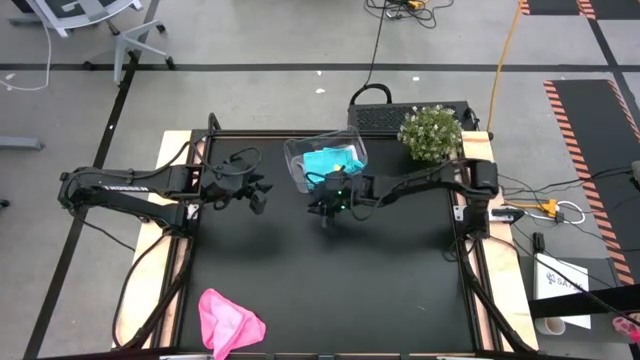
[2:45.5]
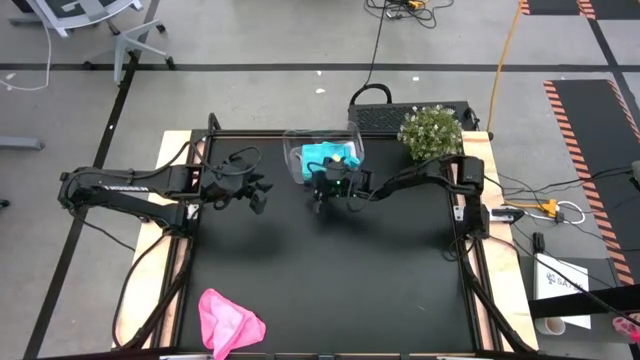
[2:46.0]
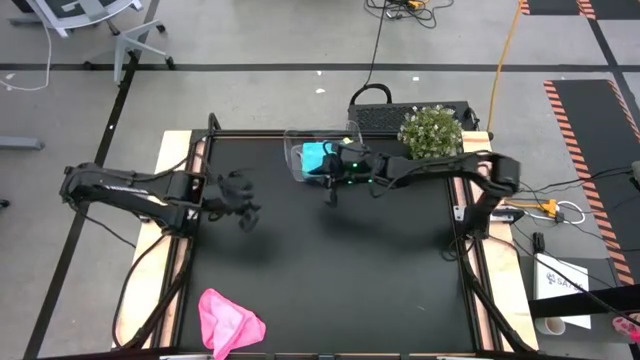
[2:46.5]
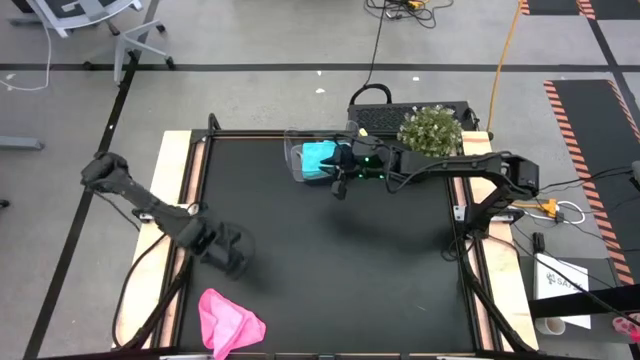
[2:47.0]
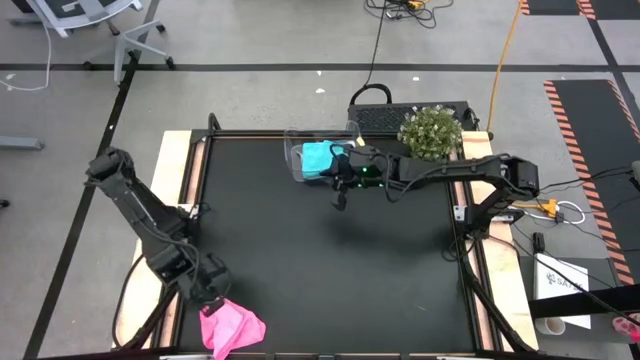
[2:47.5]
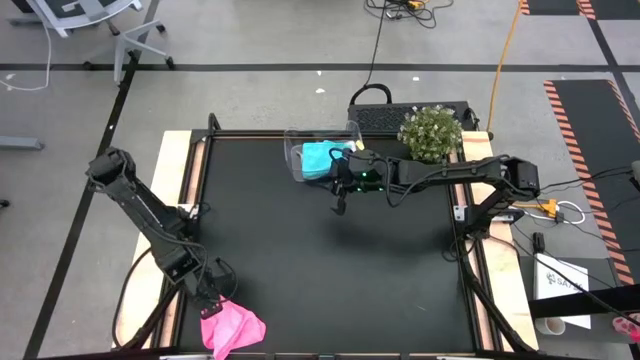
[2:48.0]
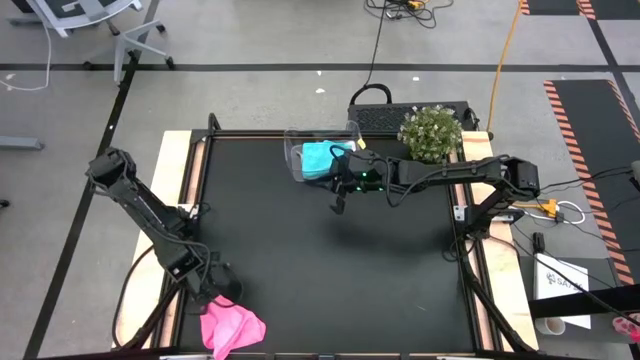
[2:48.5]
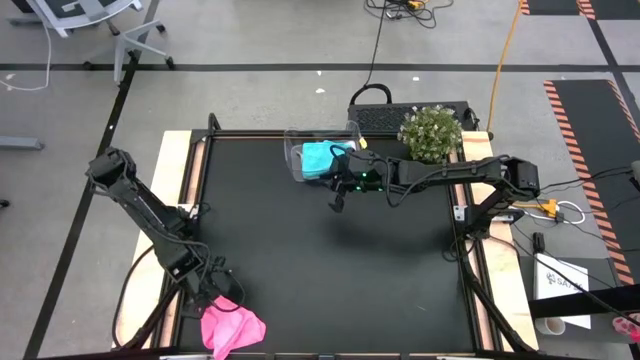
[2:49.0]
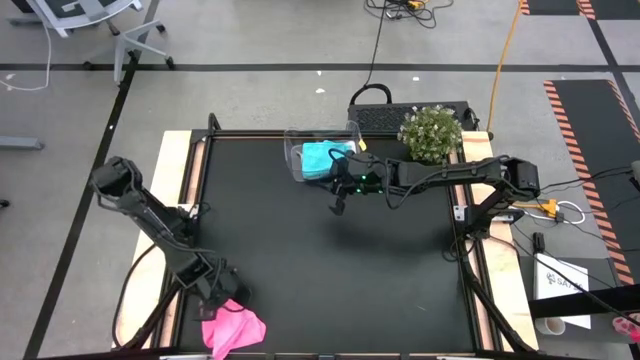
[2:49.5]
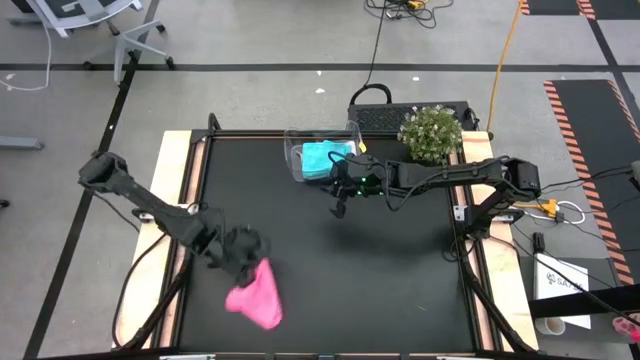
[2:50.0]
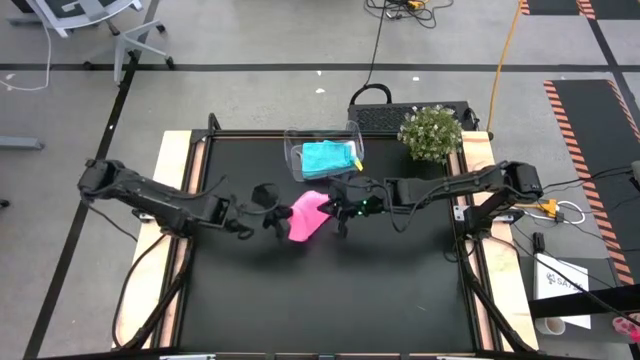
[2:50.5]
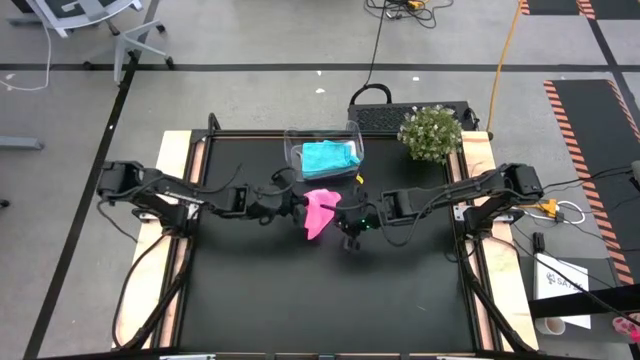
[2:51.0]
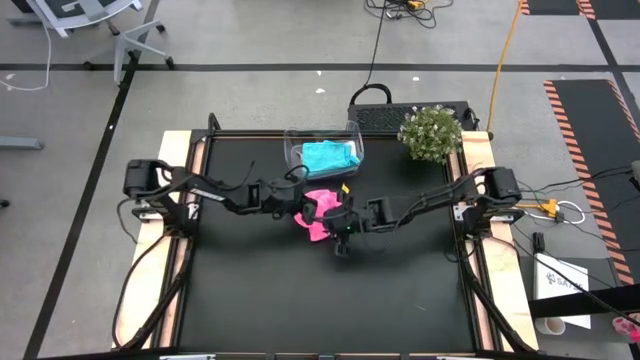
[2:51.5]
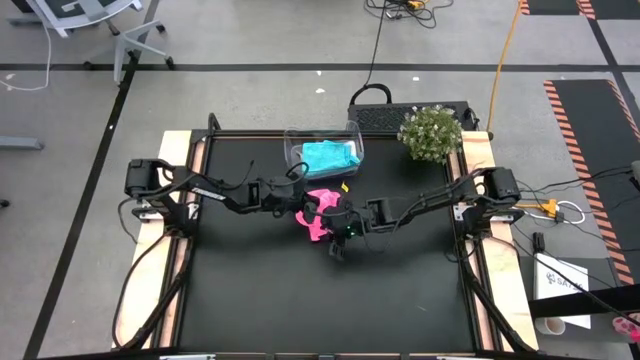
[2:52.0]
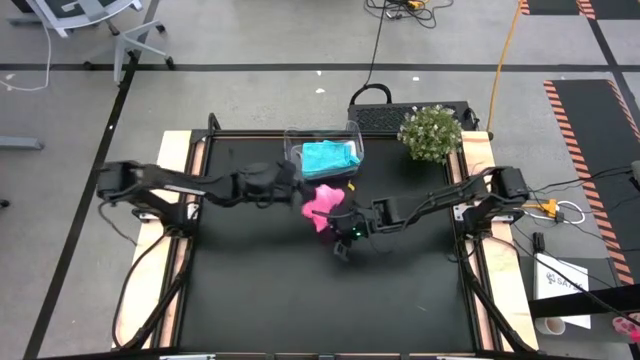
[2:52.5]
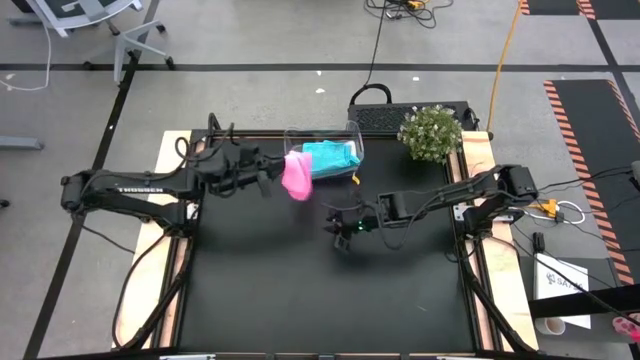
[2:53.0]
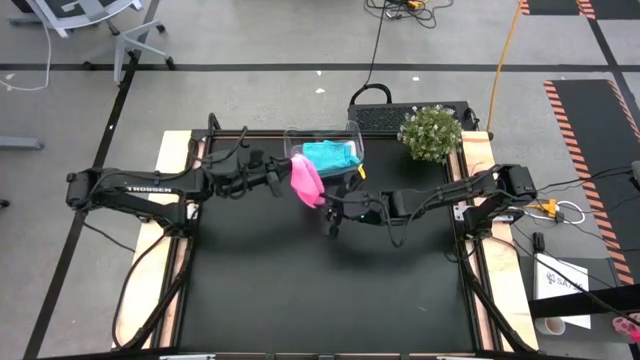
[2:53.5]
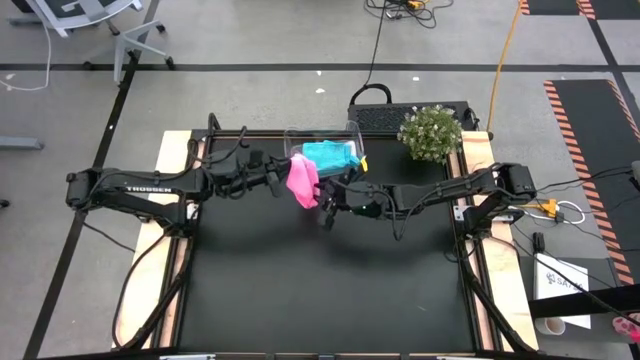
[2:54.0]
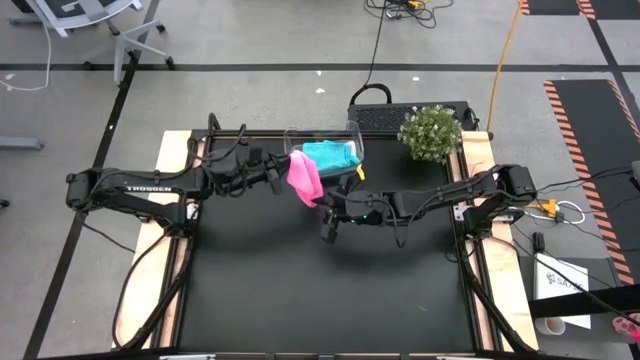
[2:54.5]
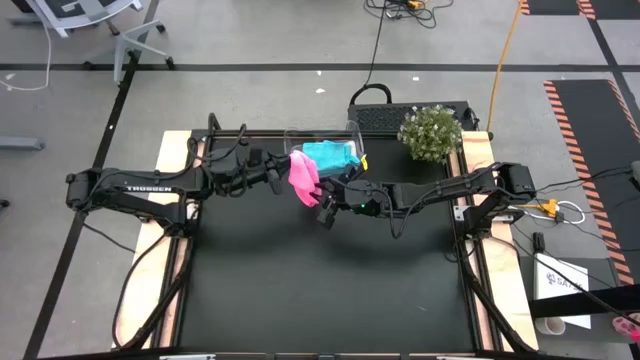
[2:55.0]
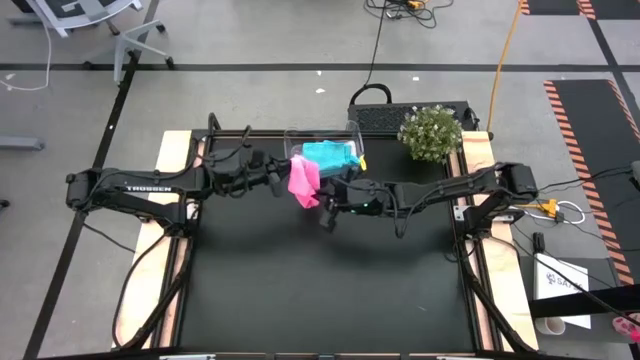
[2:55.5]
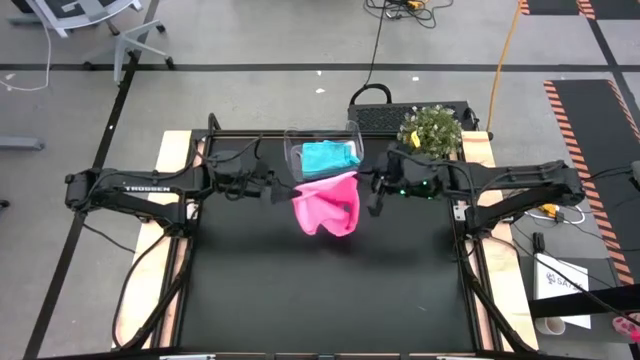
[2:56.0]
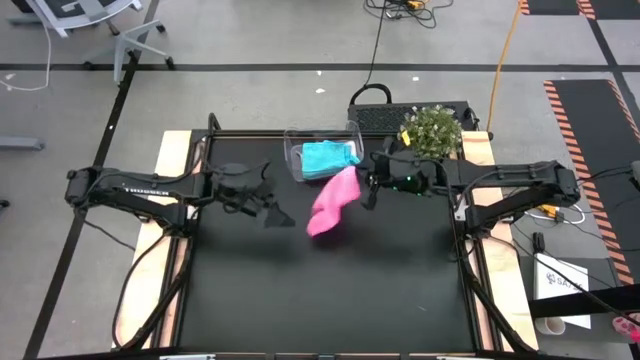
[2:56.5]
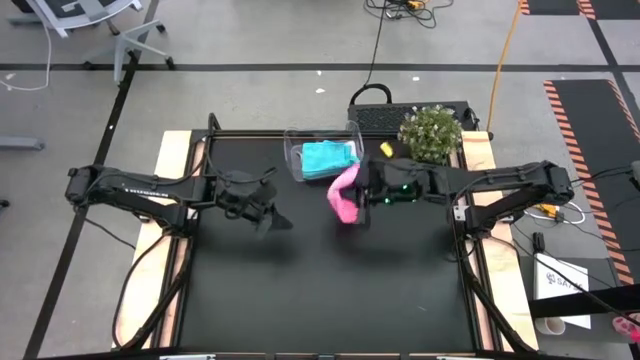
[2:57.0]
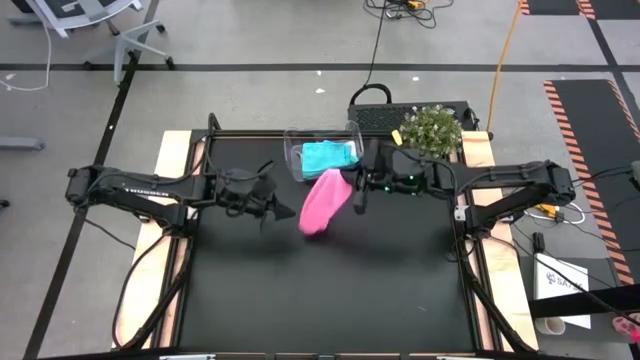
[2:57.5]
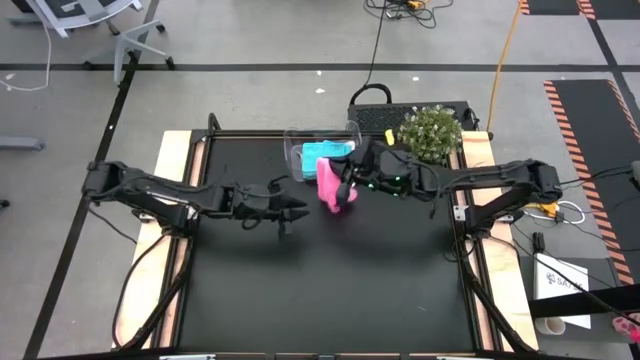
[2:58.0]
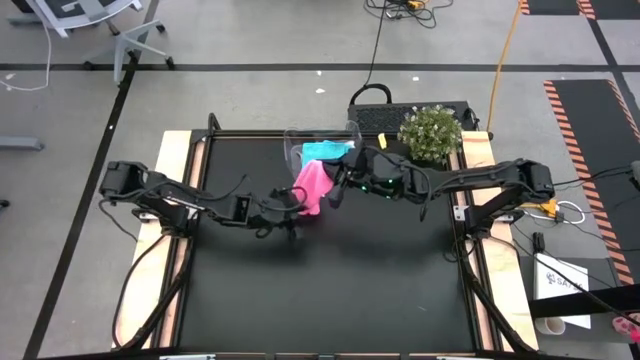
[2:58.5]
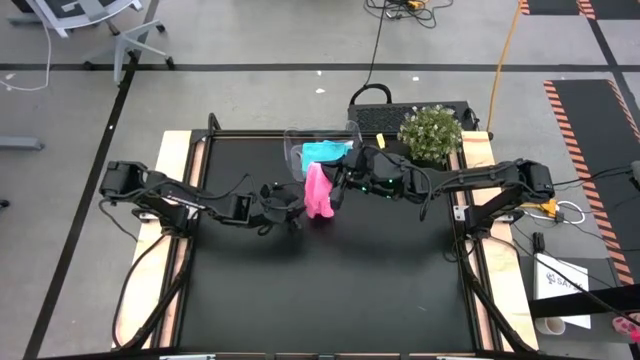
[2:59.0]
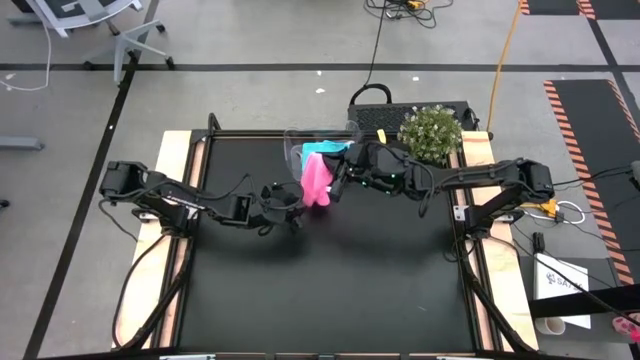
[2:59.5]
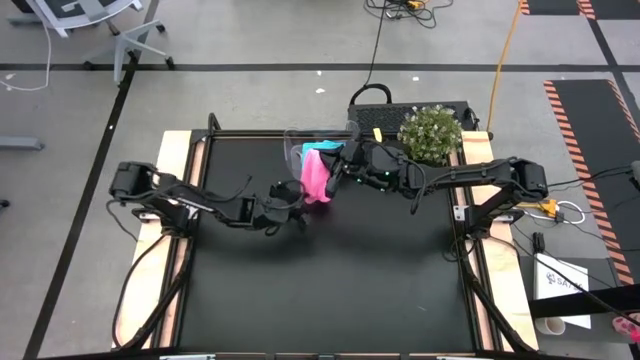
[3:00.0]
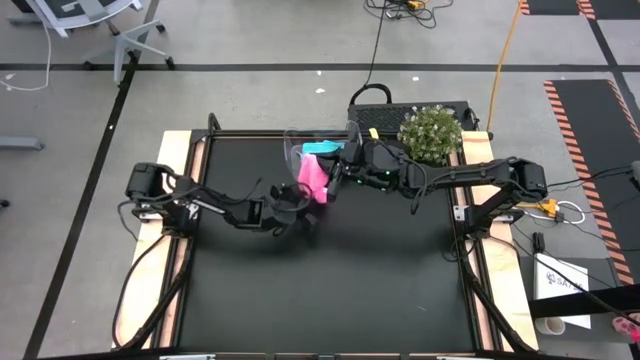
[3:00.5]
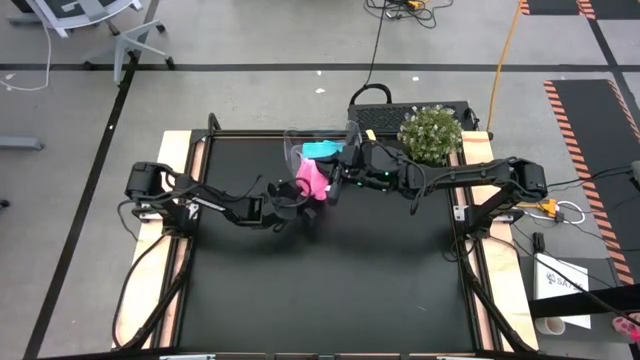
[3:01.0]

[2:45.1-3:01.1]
Task: Fold microfiber towels
Fold the pink microfiber cloth
